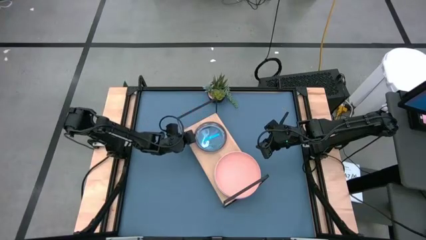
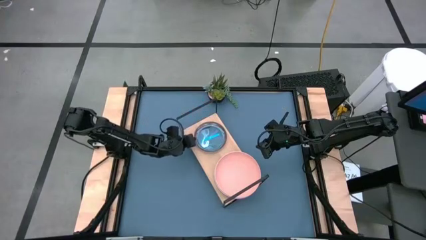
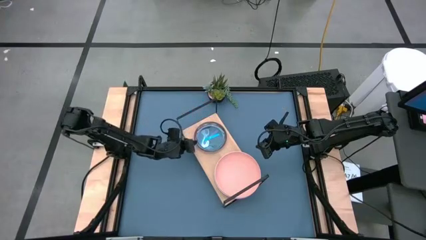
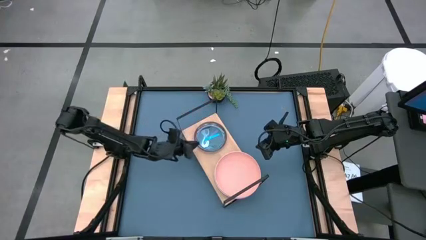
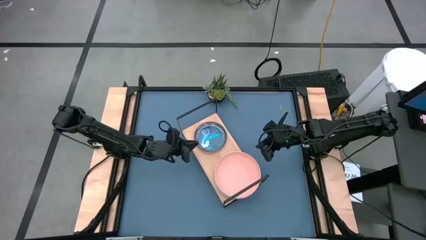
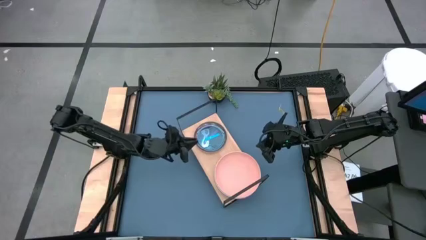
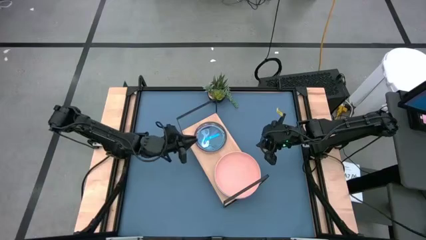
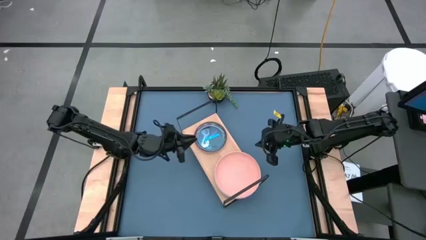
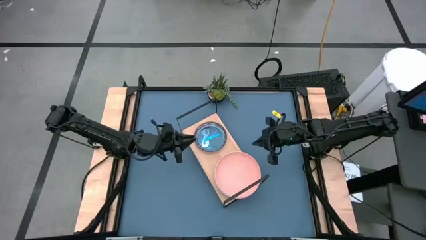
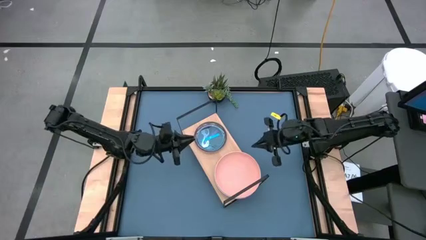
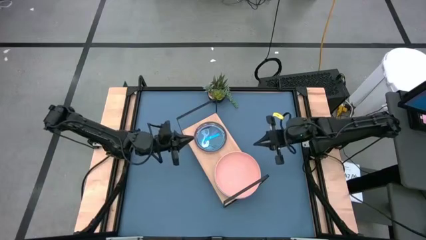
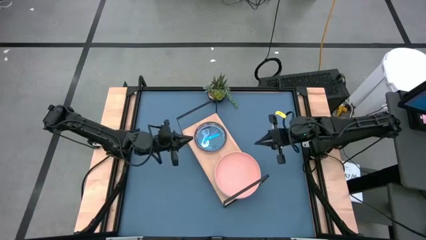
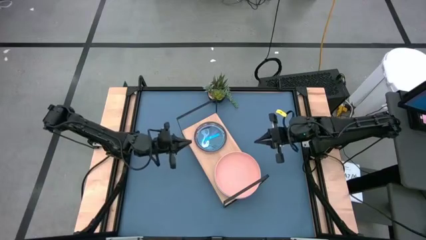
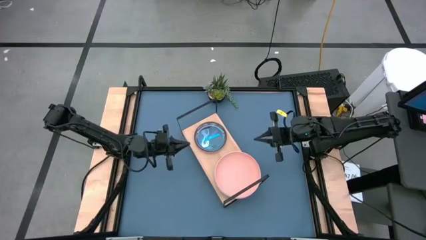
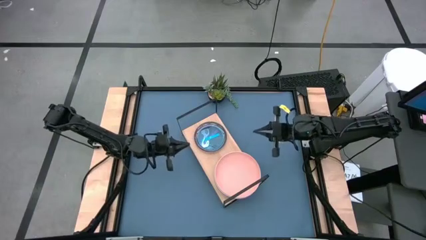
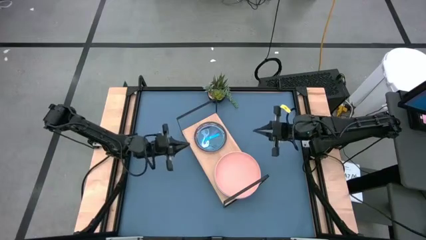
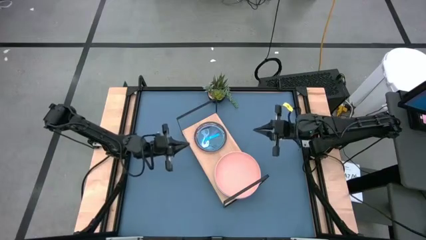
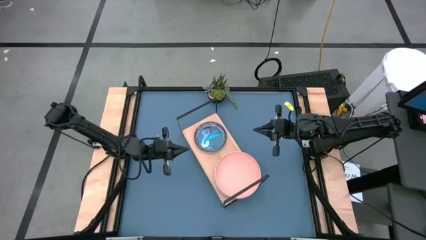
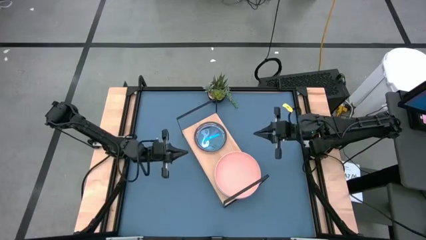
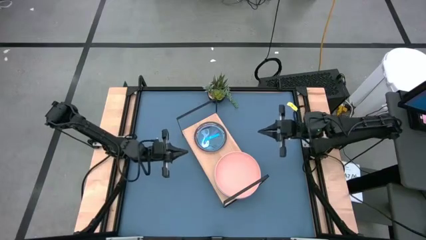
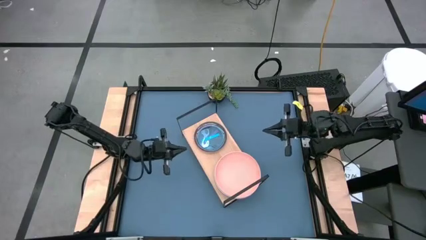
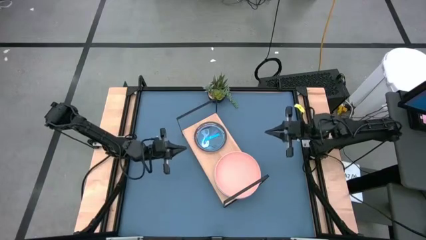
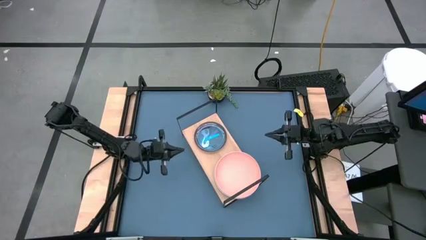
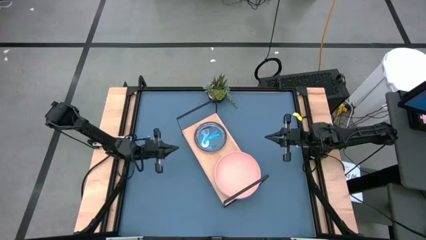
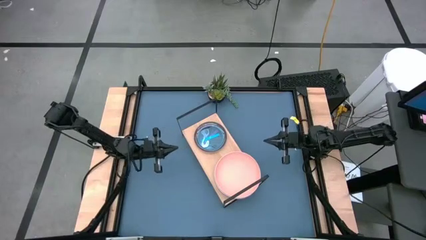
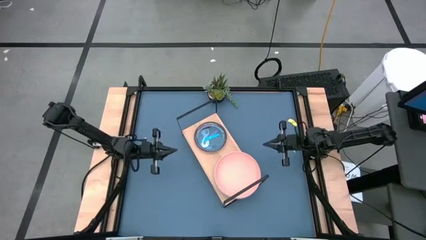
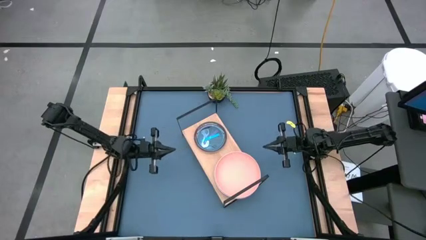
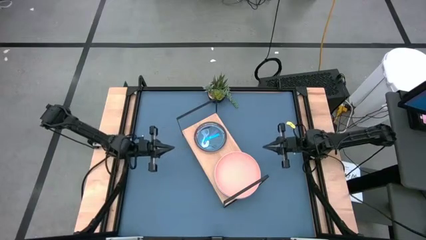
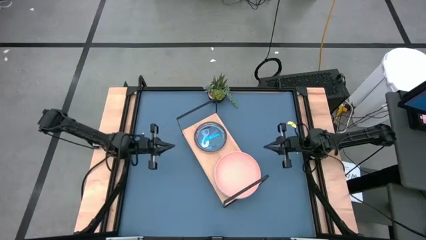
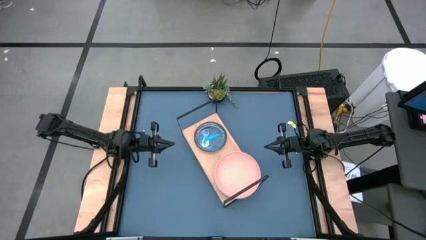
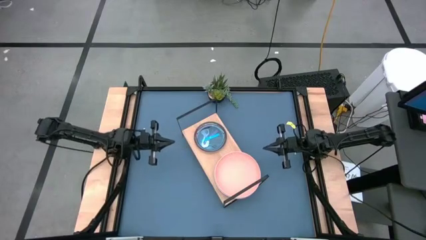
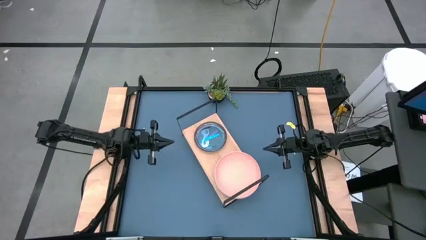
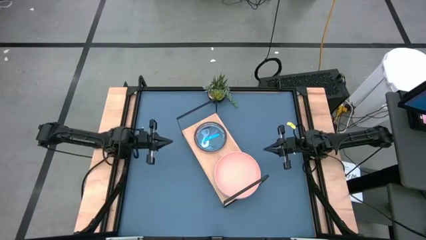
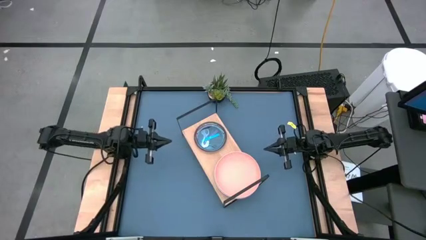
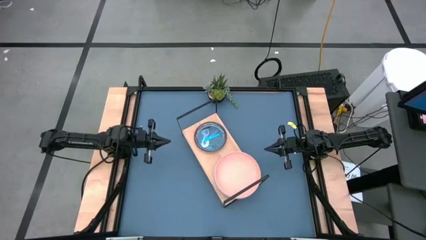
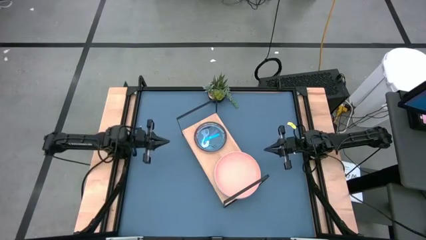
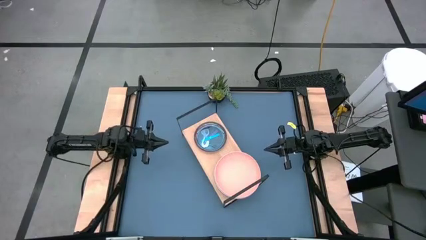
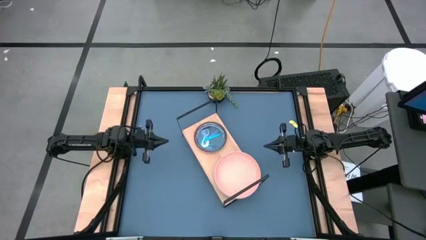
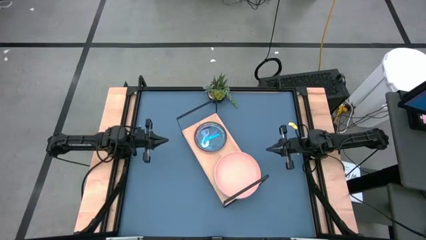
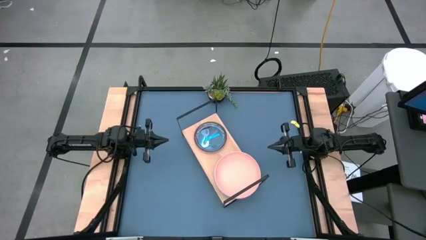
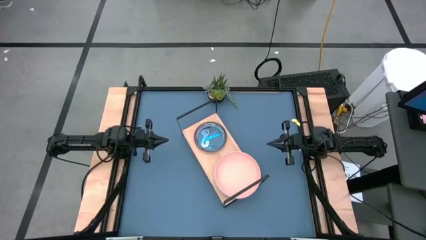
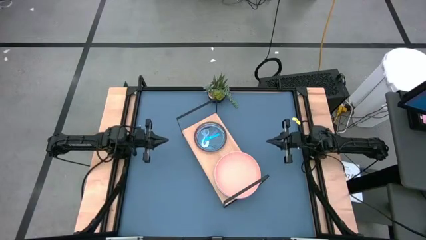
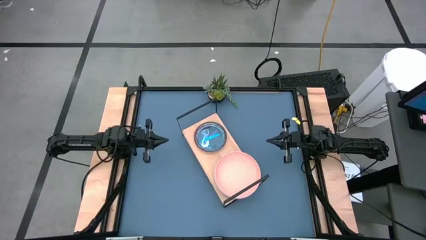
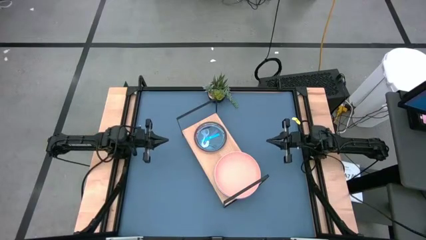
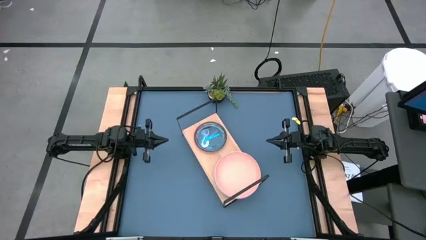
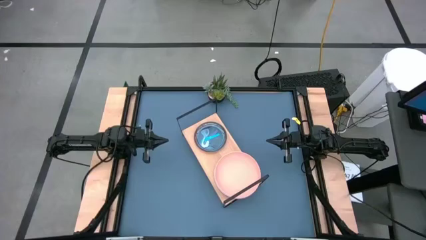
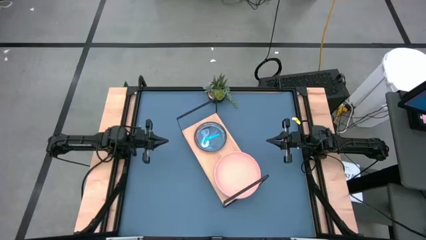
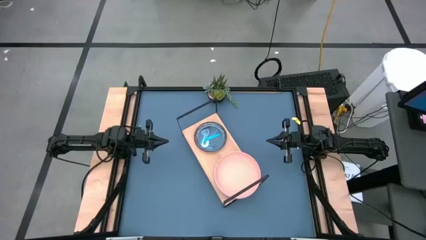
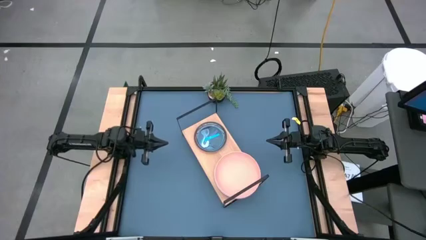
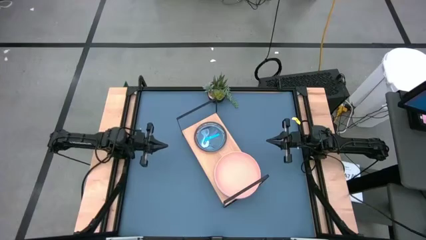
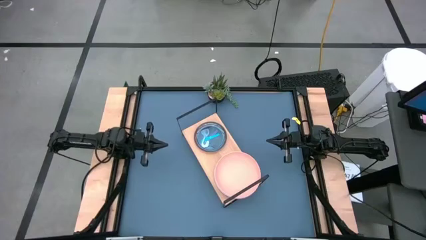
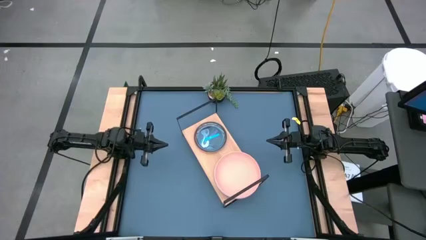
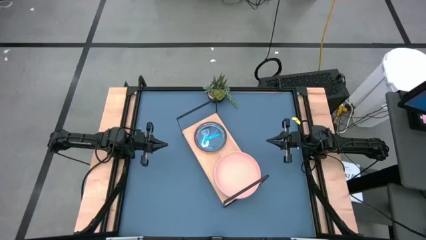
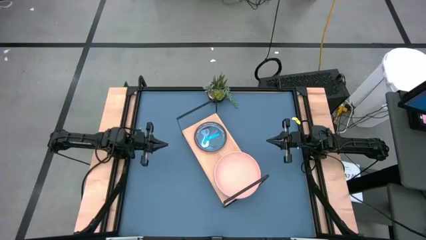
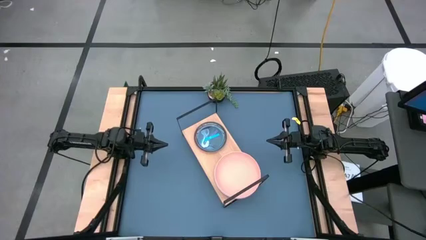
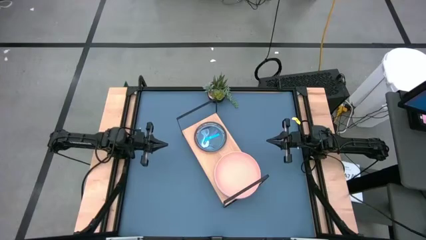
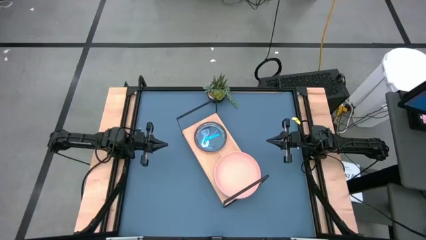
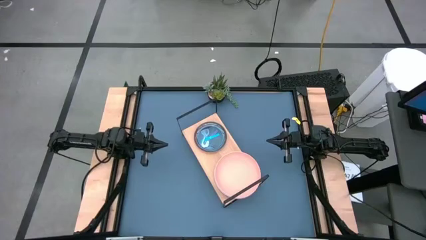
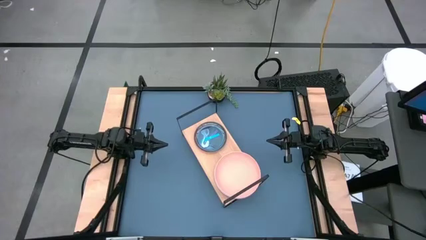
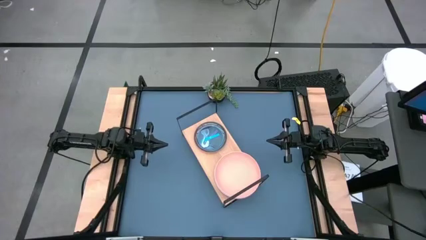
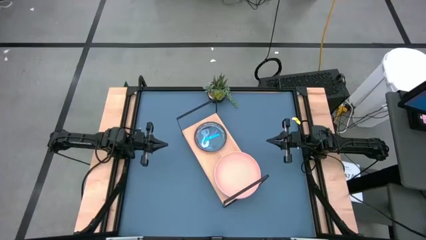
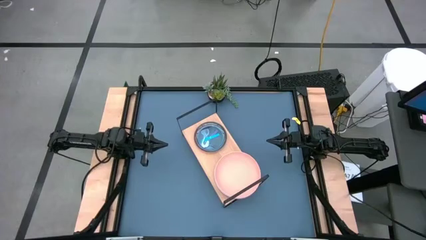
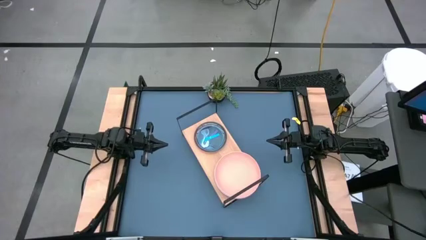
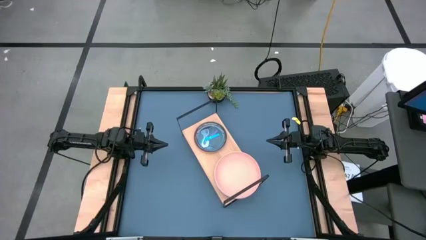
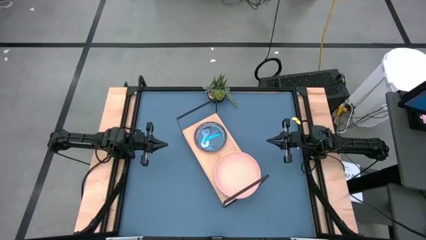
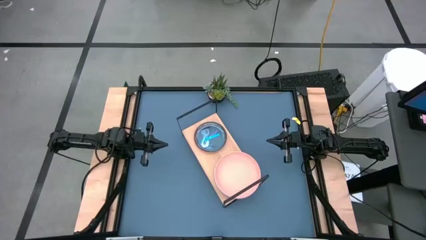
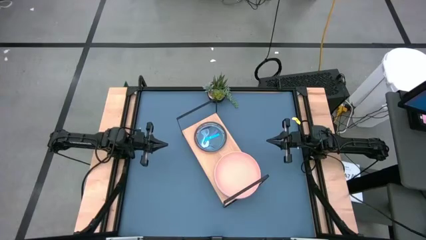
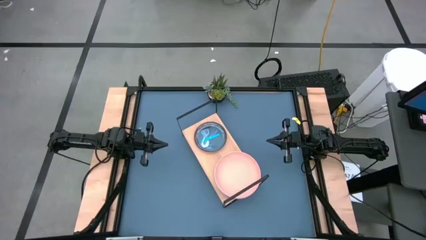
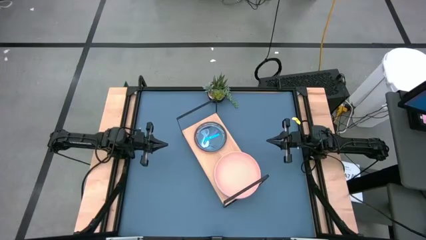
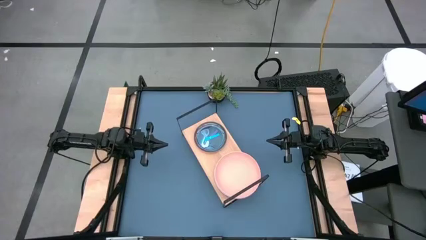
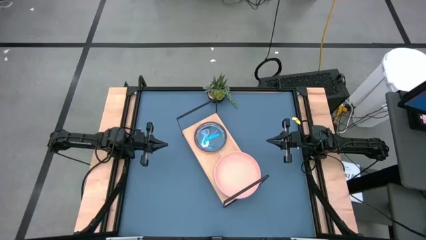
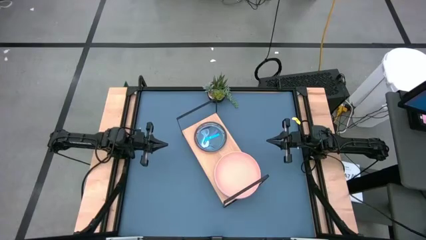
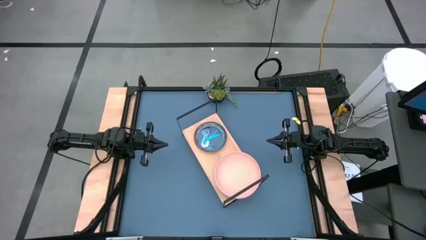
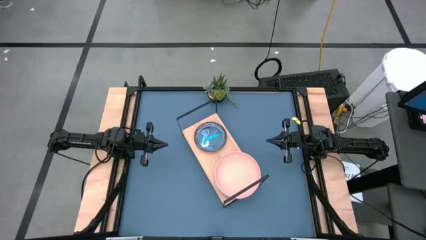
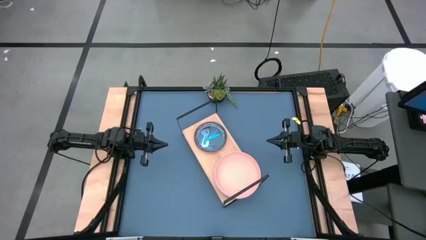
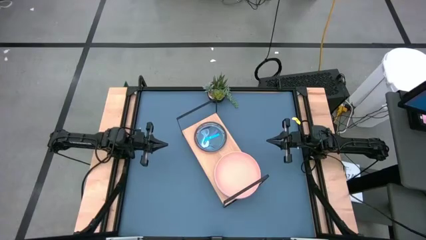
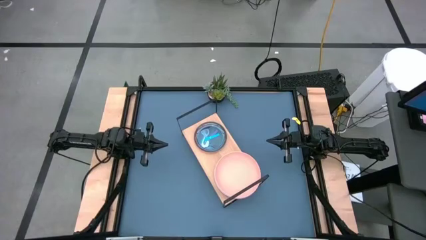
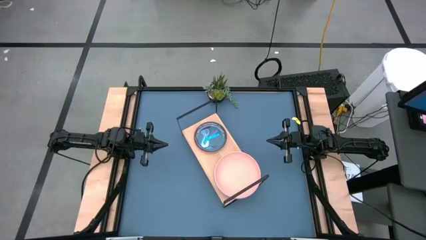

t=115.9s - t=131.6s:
Task: Place and stack plates onto a shelf
Return to Home Position

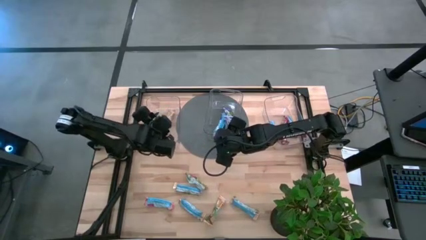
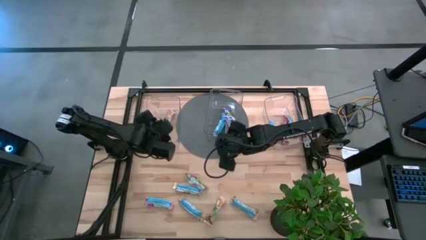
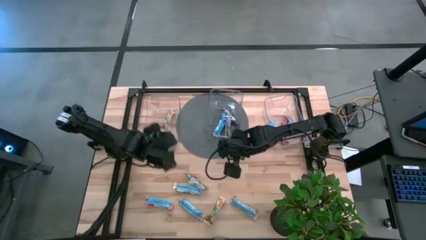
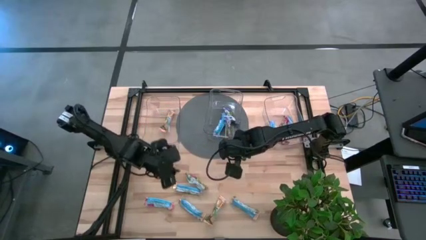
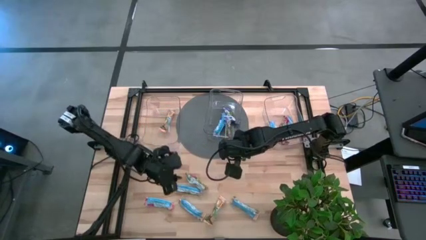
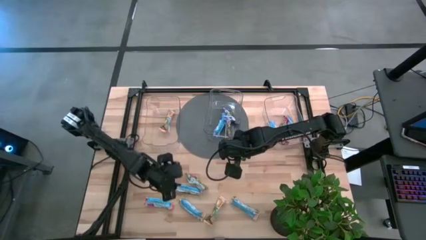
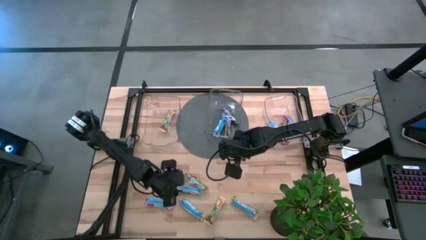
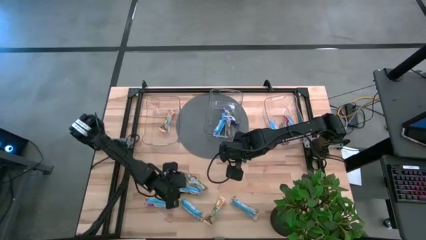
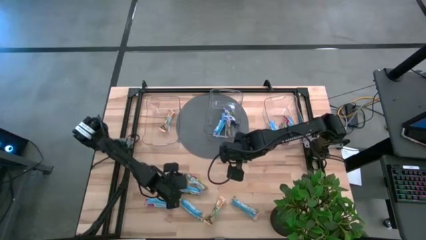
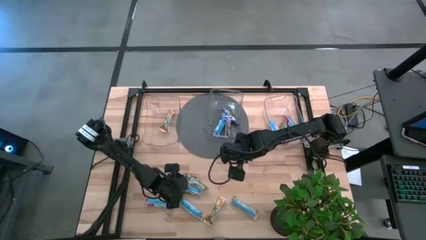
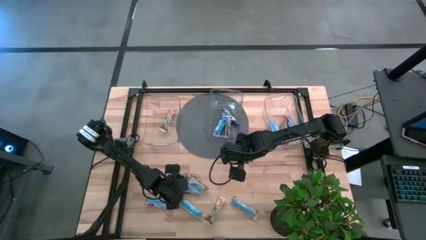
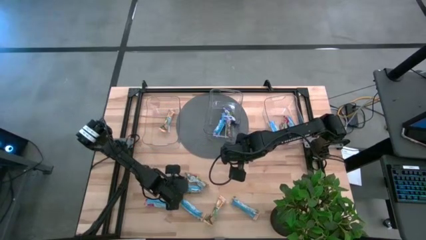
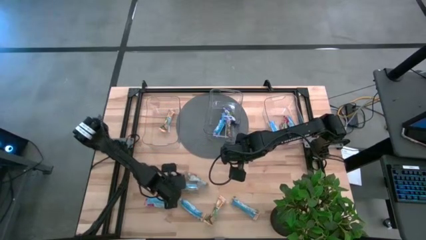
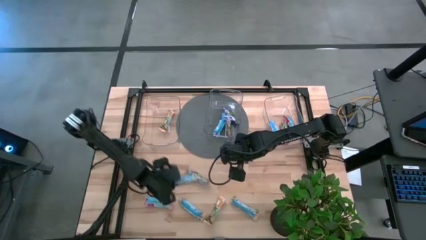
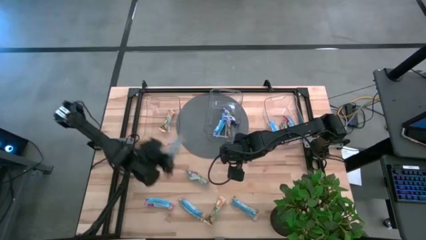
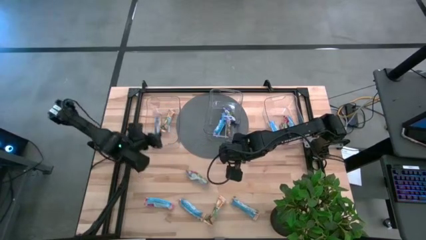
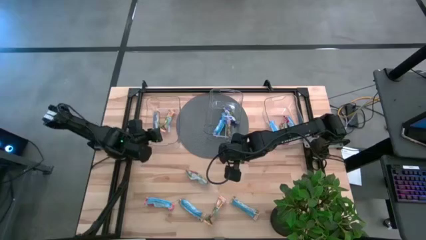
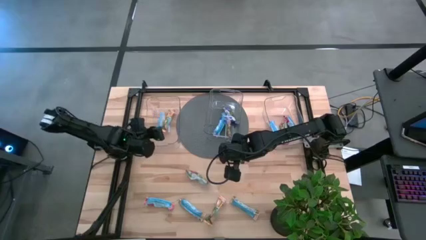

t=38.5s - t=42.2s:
Task: Pick and place Granola Bars by type
Put the yellow granola bar into the left transparent bin
